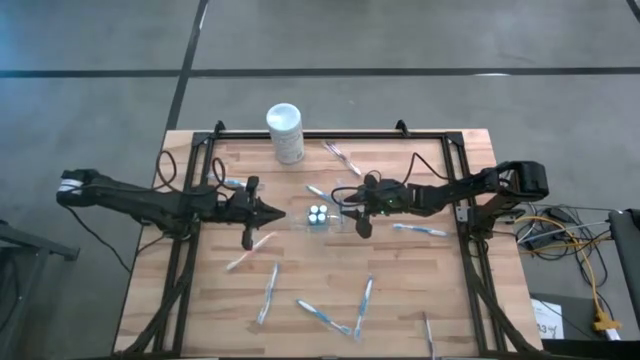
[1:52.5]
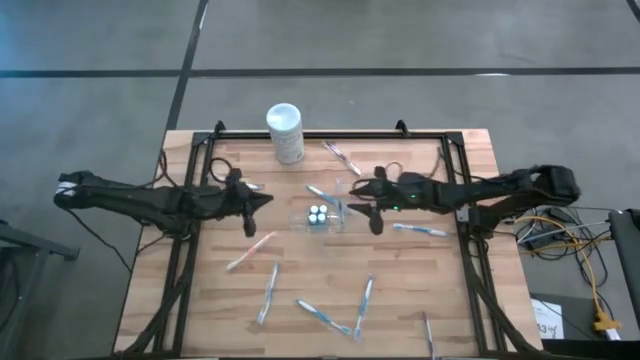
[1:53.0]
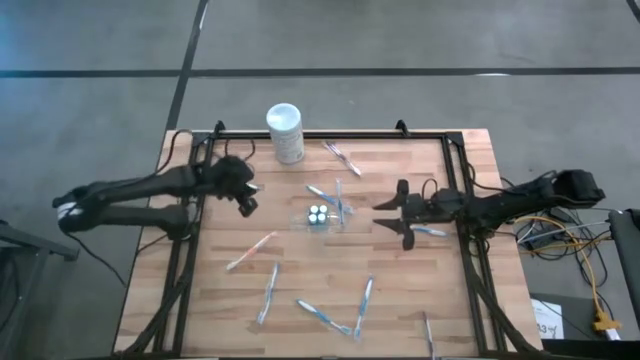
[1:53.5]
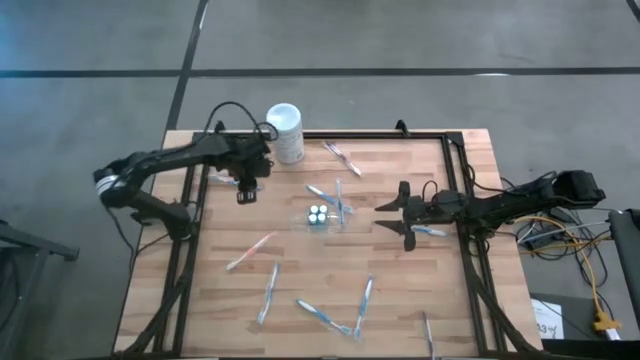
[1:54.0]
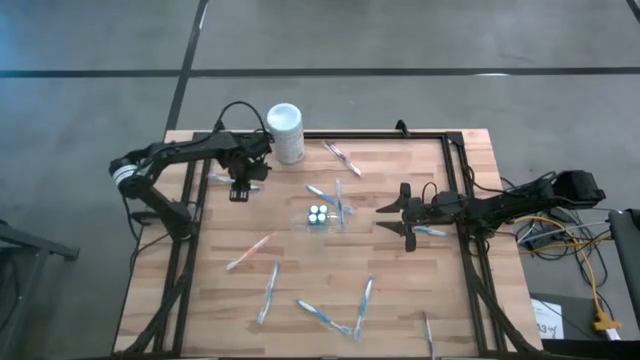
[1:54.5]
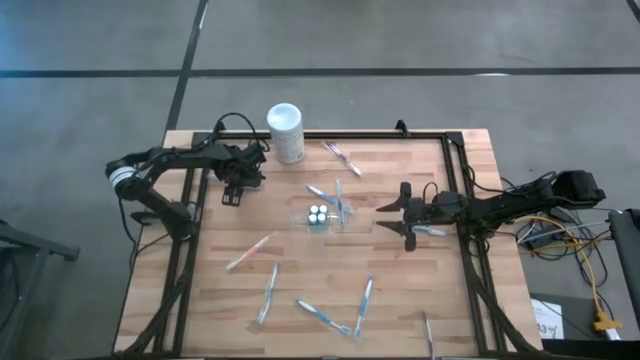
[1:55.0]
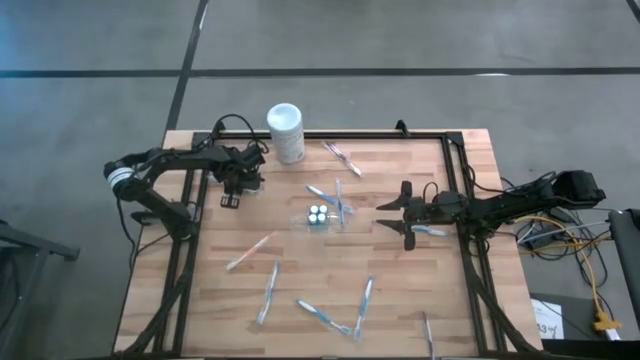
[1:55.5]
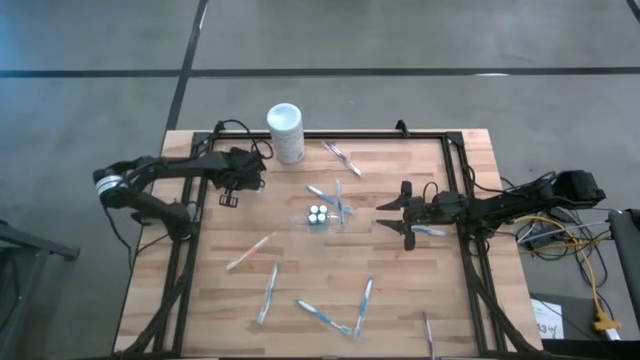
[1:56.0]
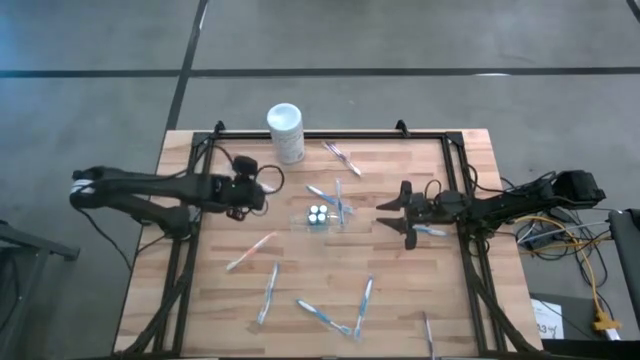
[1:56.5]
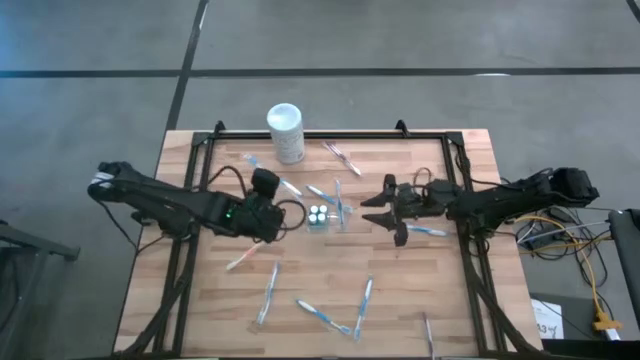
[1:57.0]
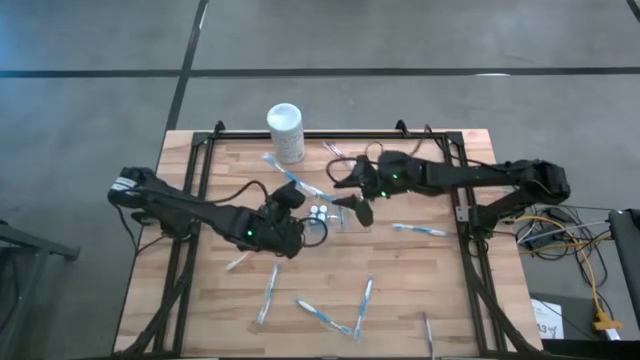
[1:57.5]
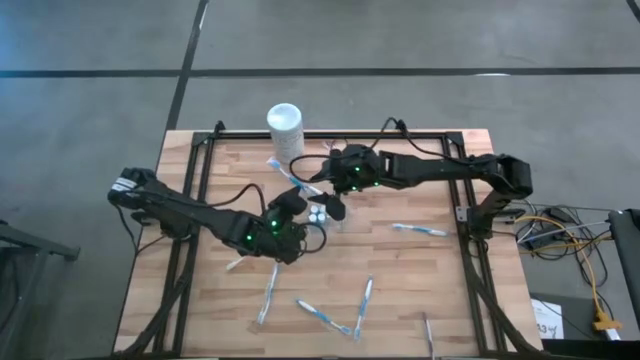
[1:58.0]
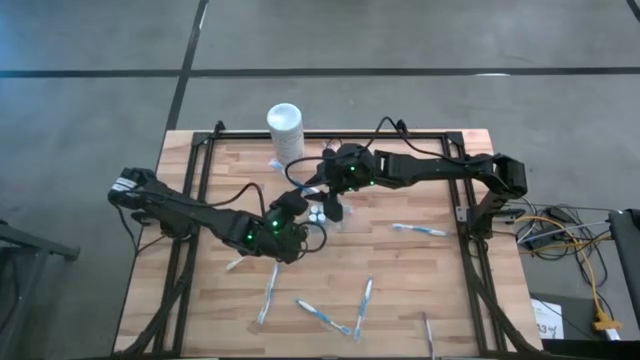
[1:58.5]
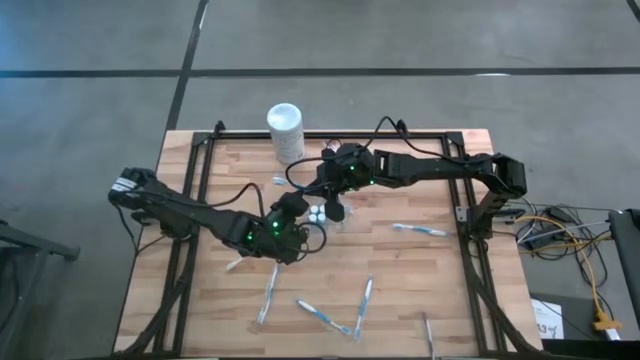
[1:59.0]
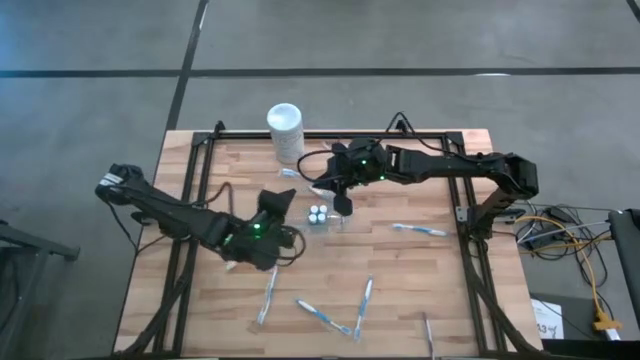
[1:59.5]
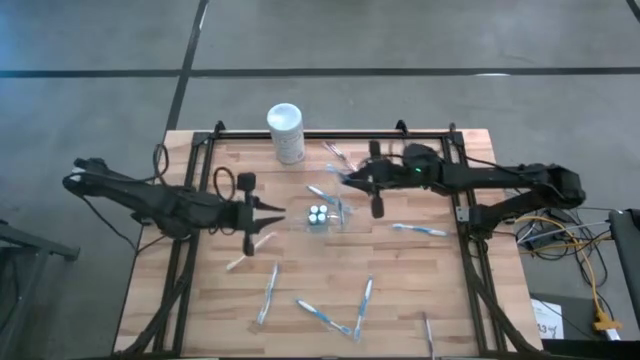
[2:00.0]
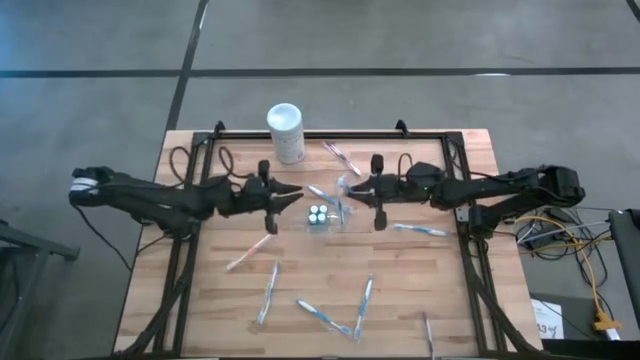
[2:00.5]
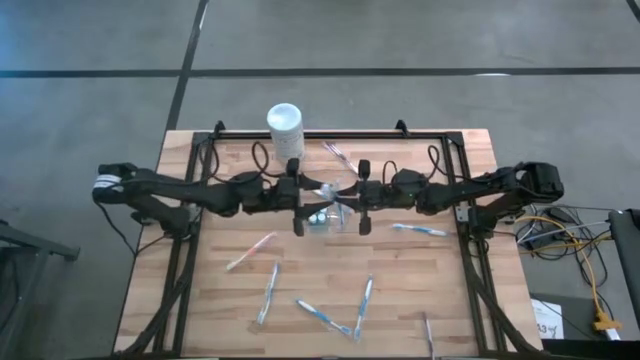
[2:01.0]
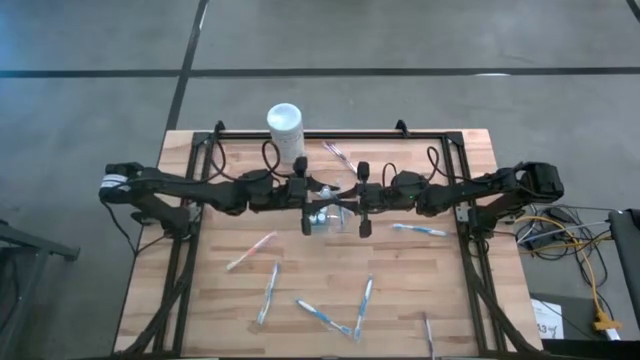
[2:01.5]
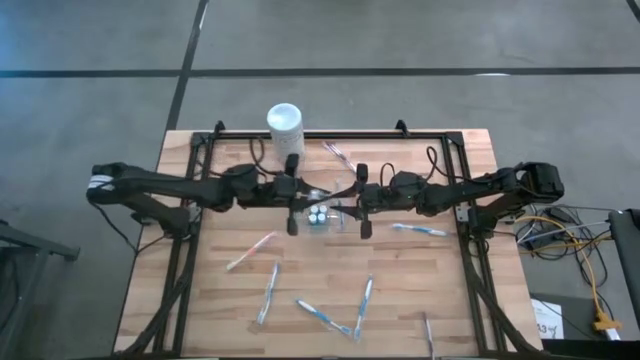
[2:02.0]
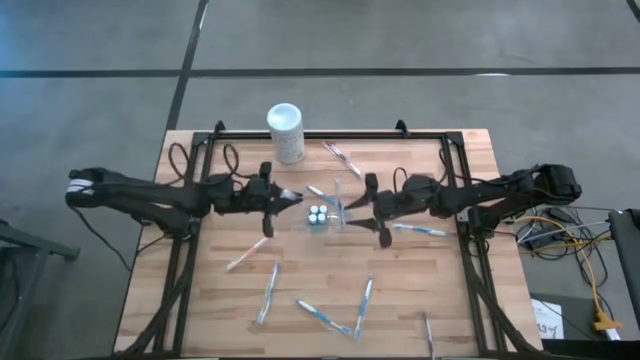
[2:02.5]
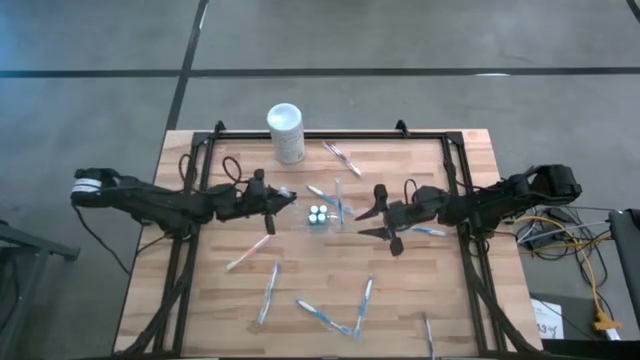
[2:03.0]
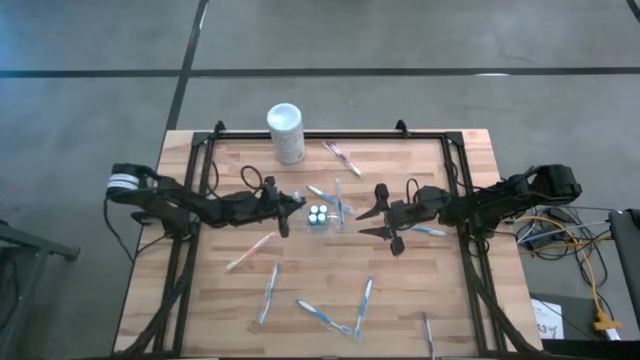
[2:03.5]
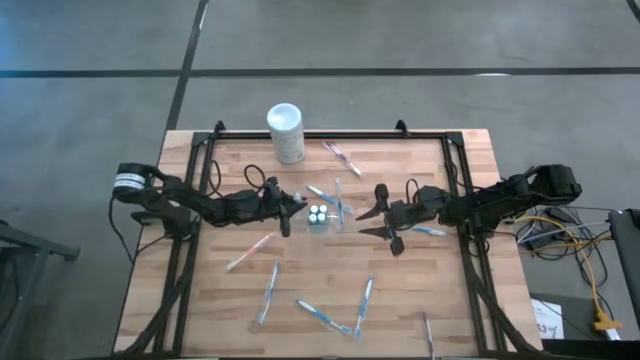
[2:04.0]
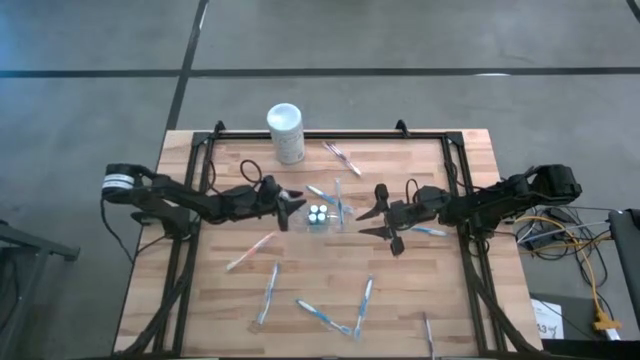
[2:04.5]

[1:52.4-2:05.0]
Task: Pick & Place toothbrushing station
Put the blue toothbrush into the transparent organizer

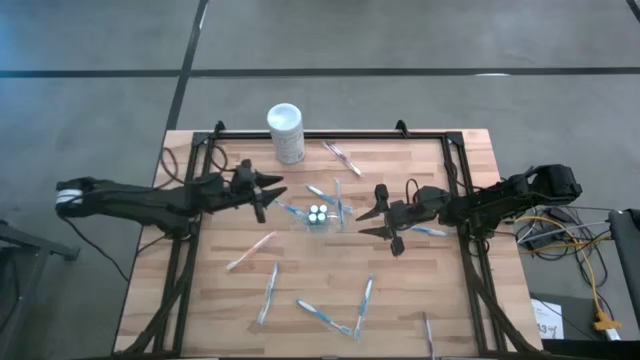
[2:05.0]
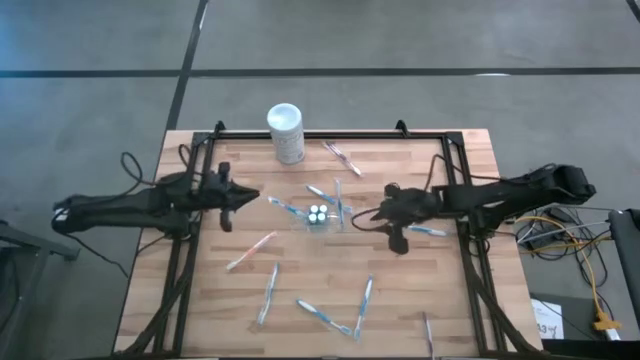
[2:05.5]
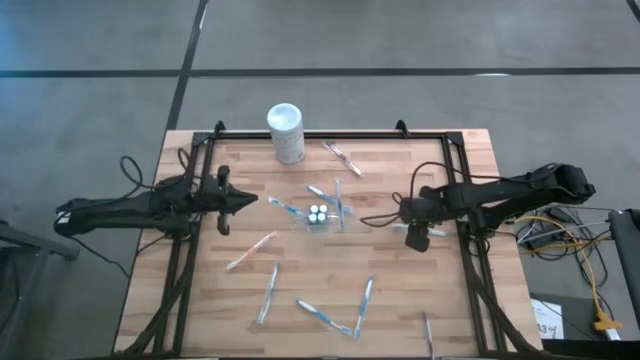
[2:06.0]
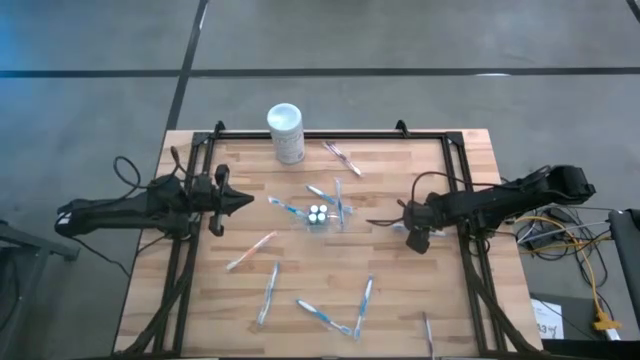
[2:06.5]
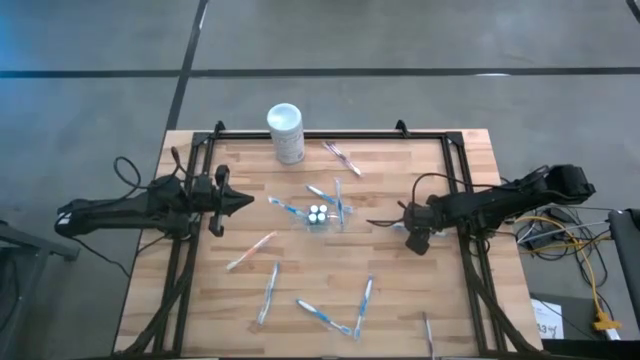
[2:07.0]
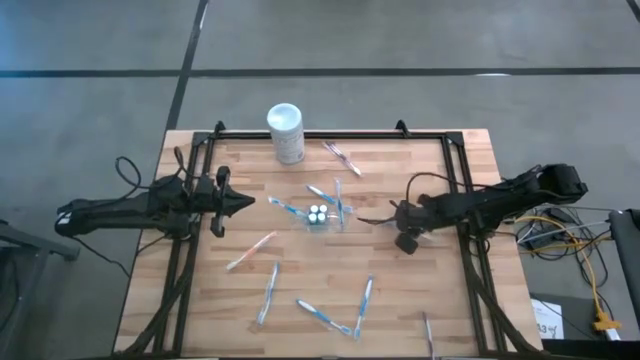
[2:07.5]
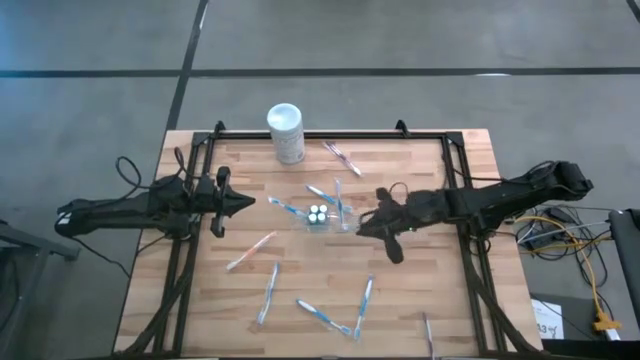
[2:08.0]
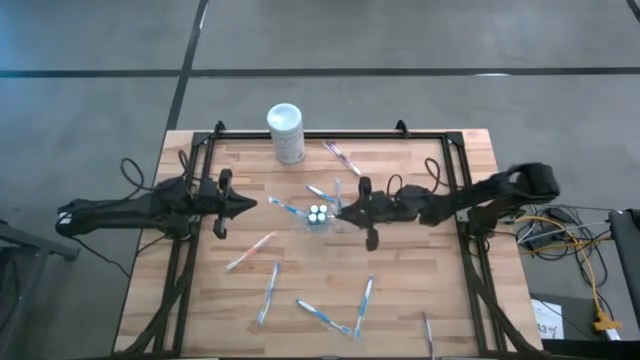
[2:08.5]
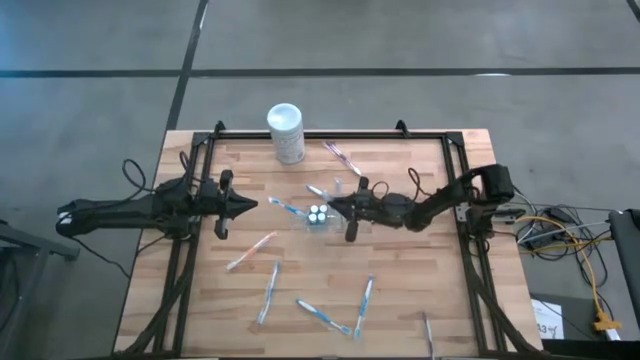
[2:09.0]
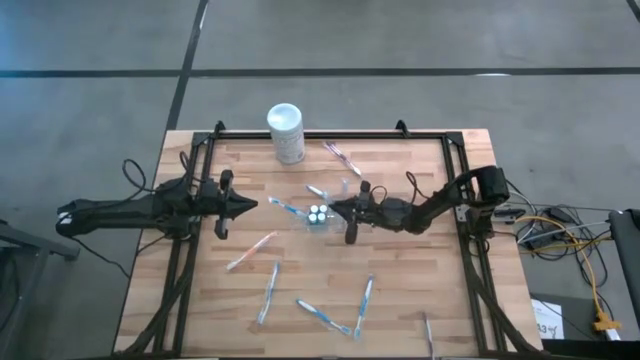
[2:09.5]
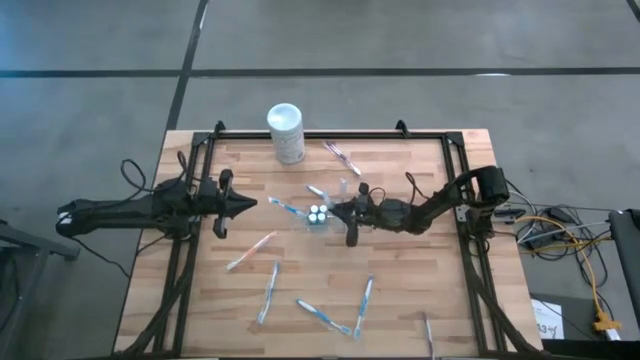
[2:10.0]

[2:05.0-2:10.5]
Put the blue toothbrush into the transparent organizer

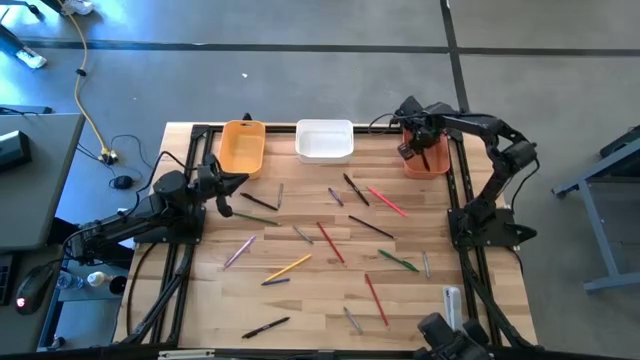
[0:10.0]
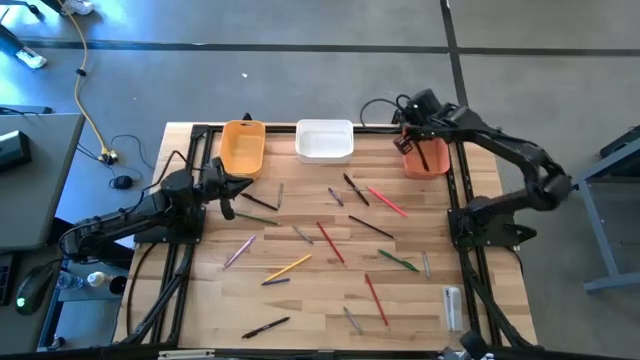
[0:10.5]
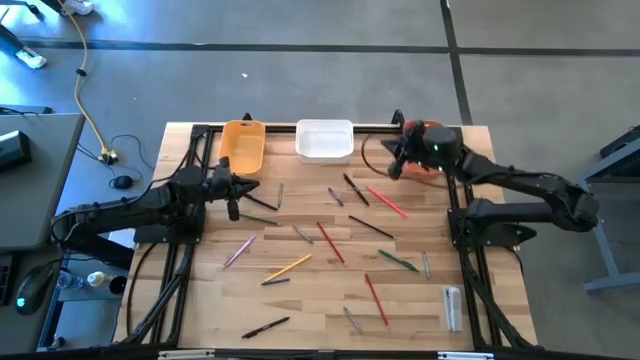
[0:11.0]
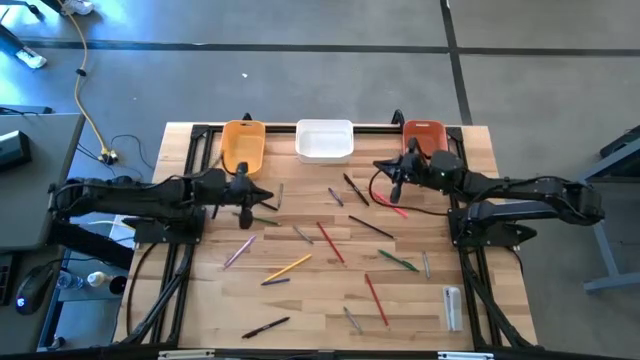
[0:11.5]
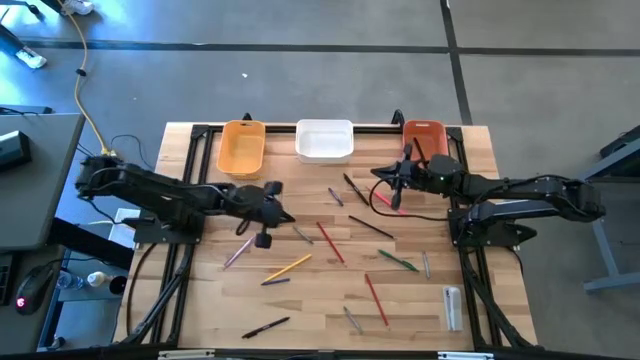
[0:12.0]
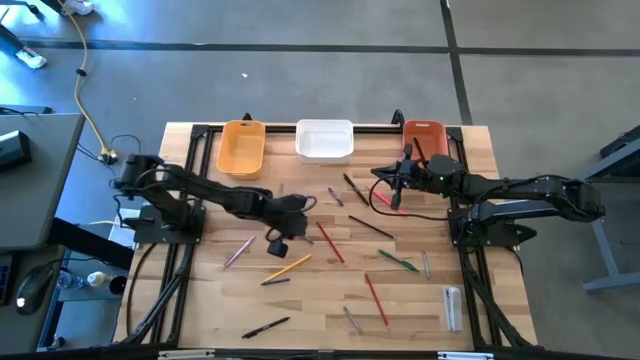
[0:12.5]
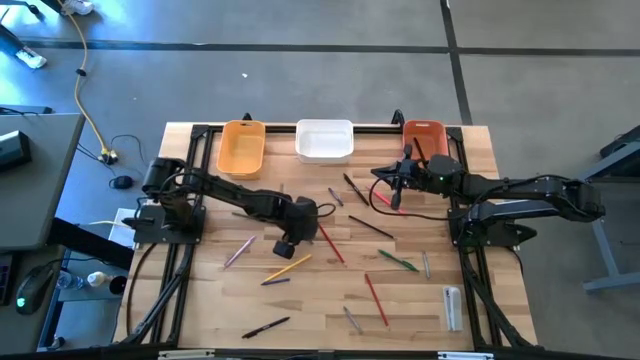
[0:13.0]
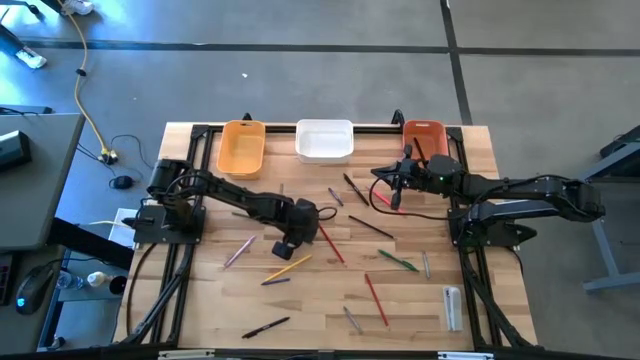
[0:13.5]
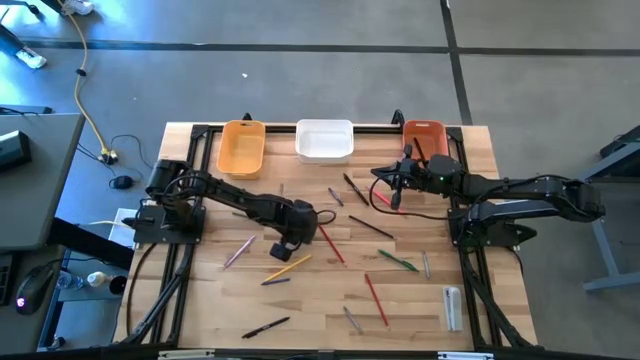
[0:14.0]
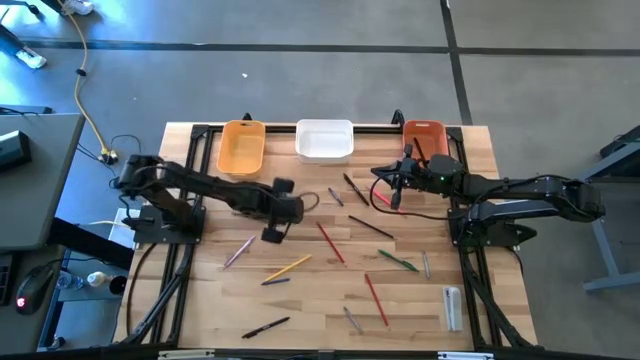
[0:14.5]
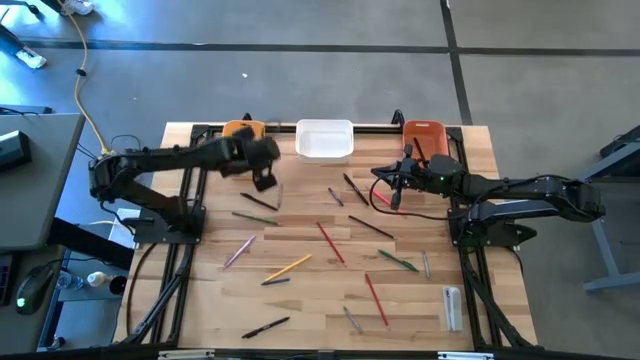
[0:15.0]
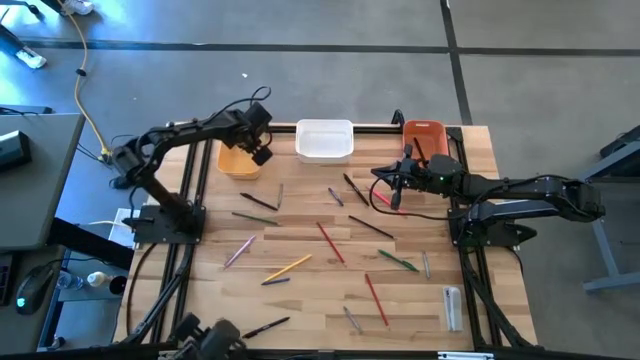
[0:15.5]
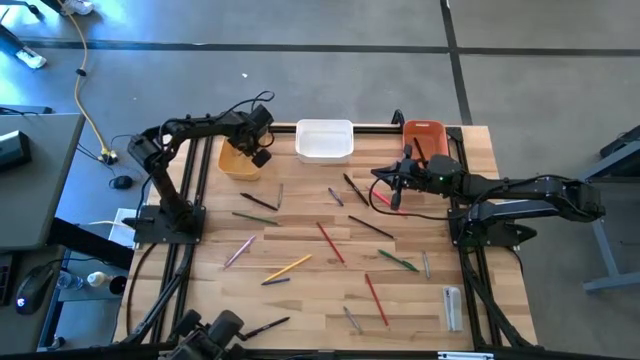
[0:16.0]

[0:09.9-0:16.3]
Task: Sort crayons/erasers/pens/pencils in bins
Put the gray crayon into the yellow bin
